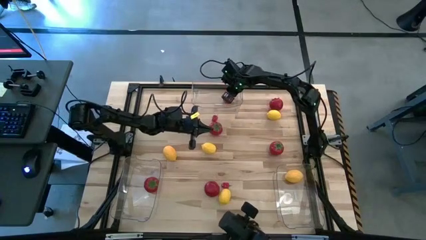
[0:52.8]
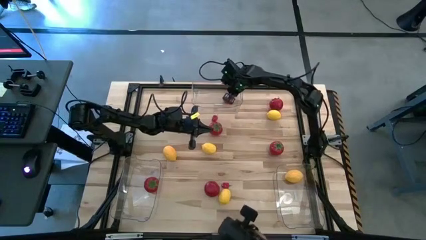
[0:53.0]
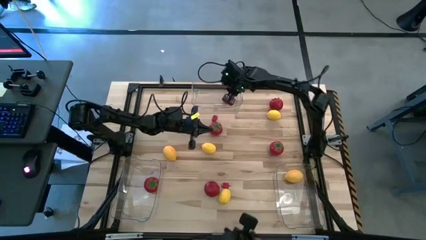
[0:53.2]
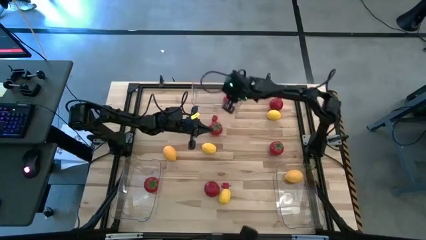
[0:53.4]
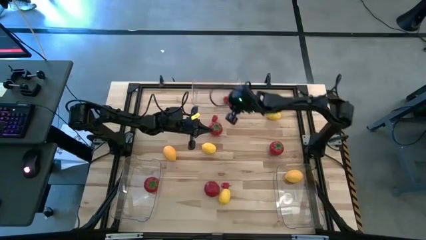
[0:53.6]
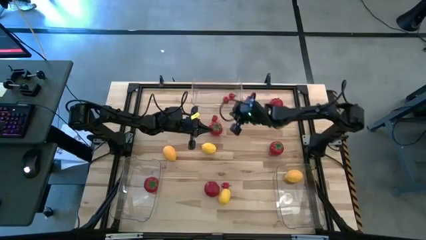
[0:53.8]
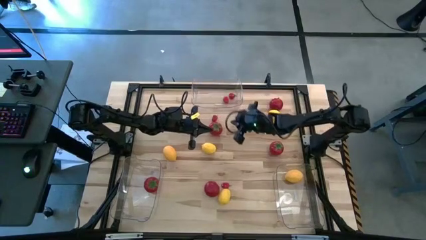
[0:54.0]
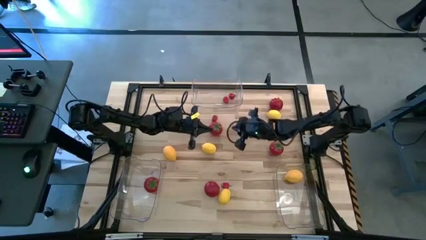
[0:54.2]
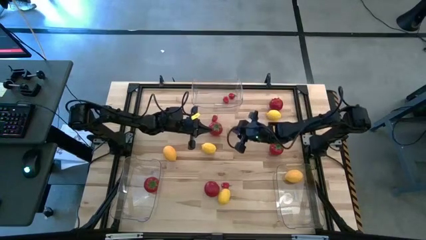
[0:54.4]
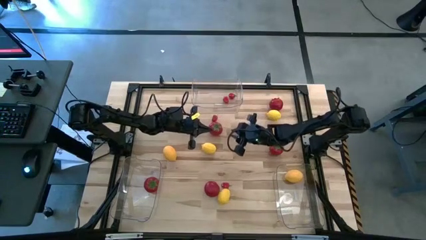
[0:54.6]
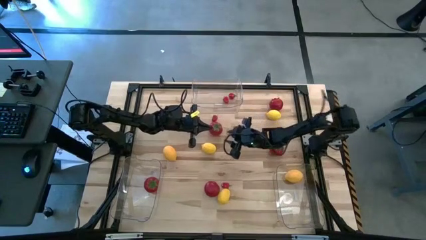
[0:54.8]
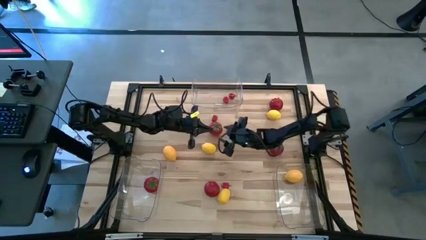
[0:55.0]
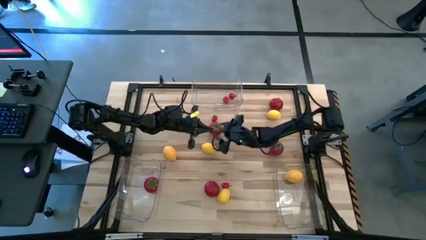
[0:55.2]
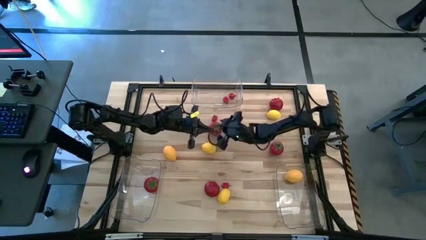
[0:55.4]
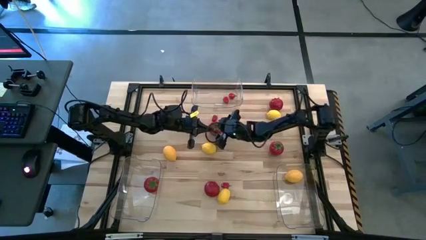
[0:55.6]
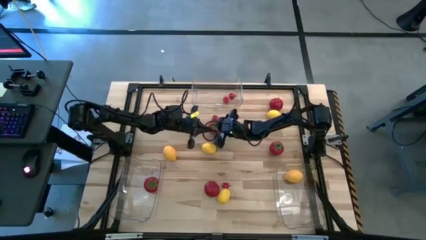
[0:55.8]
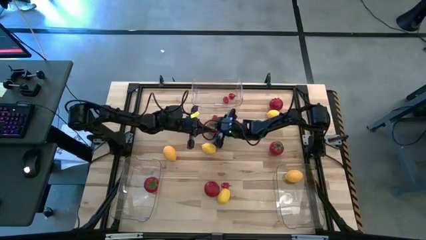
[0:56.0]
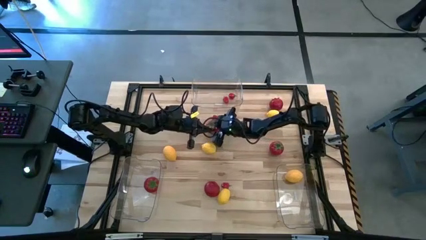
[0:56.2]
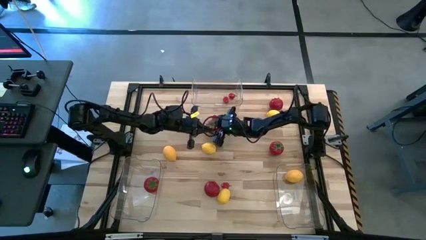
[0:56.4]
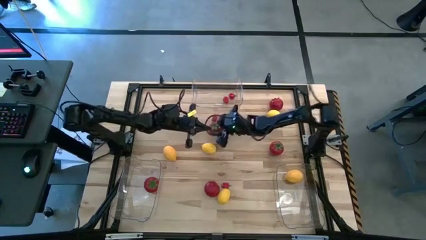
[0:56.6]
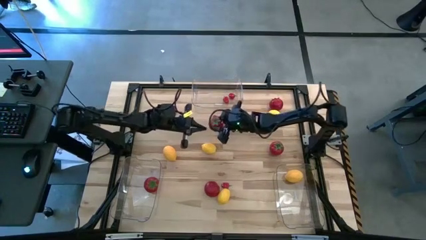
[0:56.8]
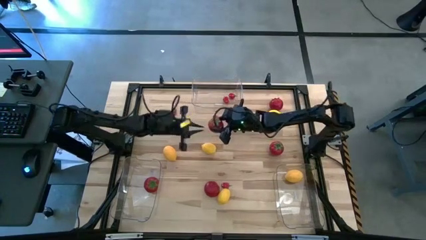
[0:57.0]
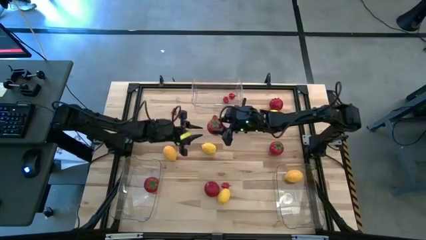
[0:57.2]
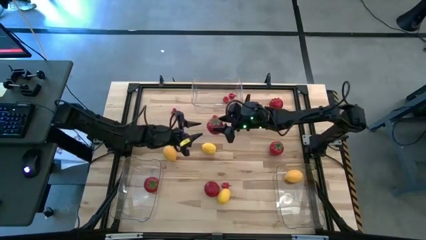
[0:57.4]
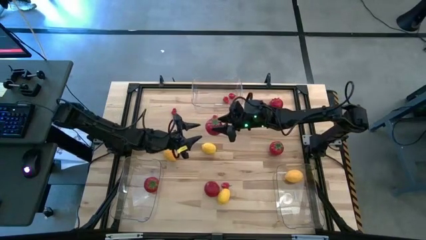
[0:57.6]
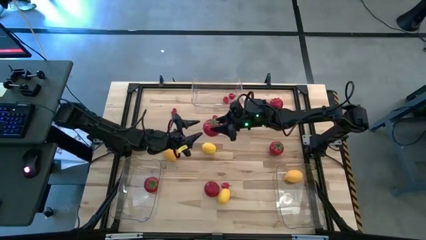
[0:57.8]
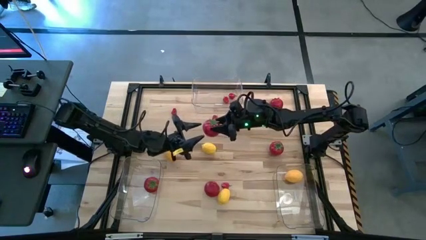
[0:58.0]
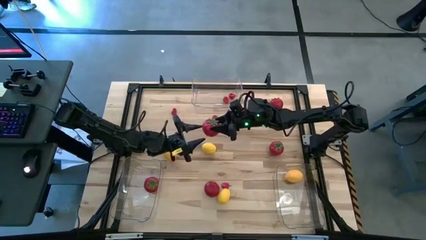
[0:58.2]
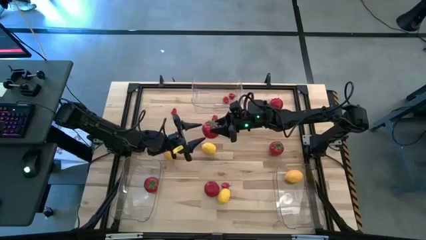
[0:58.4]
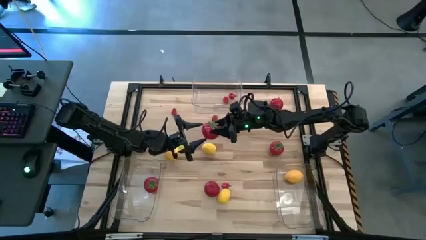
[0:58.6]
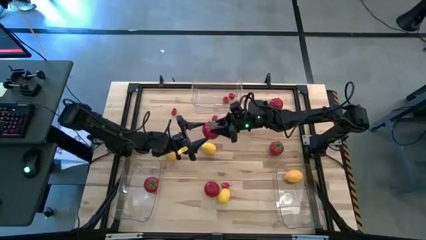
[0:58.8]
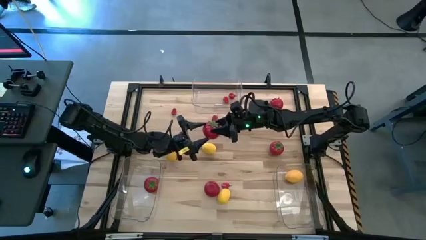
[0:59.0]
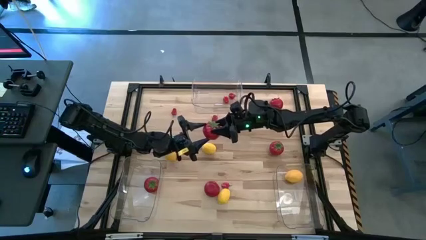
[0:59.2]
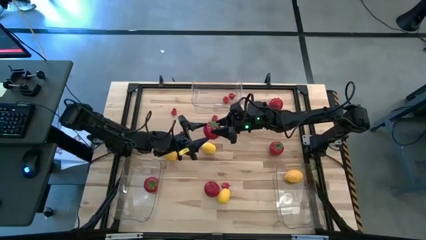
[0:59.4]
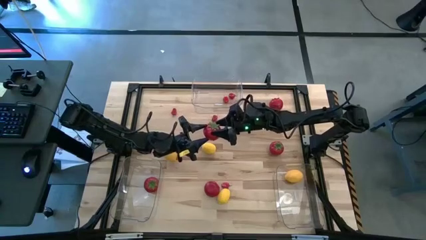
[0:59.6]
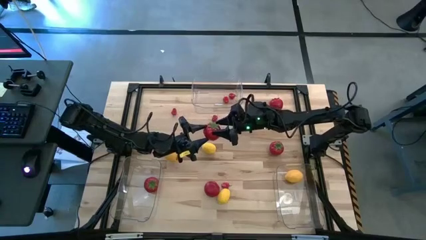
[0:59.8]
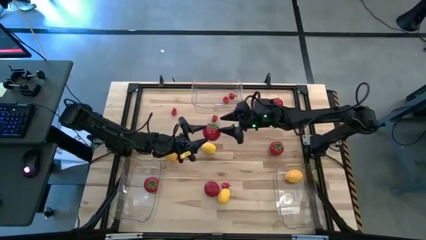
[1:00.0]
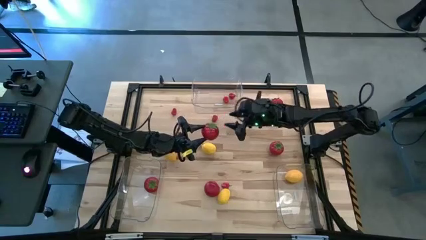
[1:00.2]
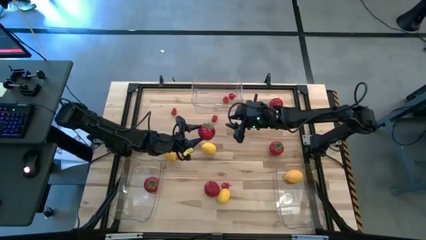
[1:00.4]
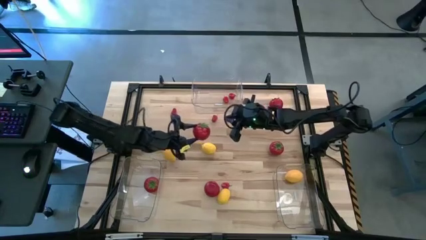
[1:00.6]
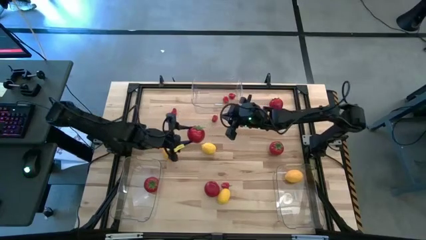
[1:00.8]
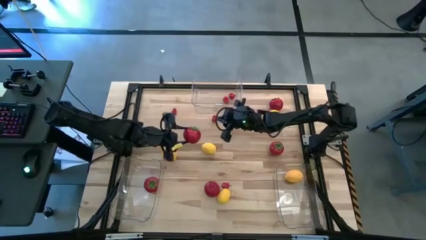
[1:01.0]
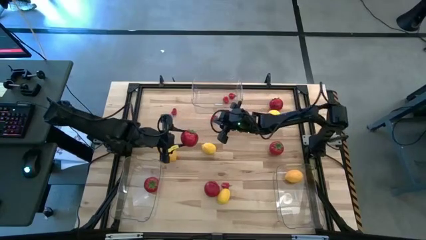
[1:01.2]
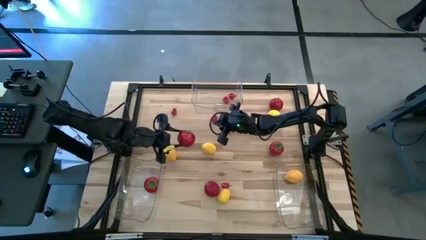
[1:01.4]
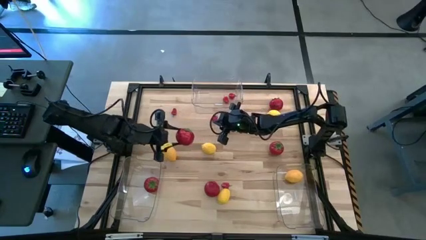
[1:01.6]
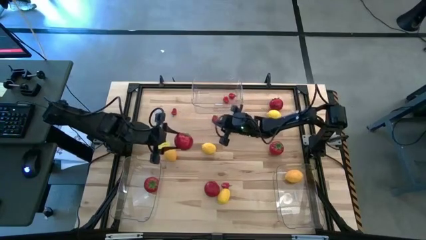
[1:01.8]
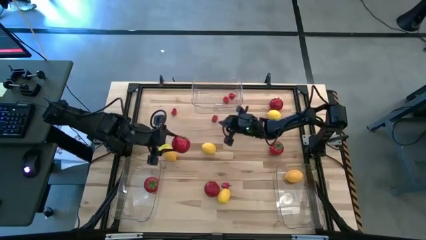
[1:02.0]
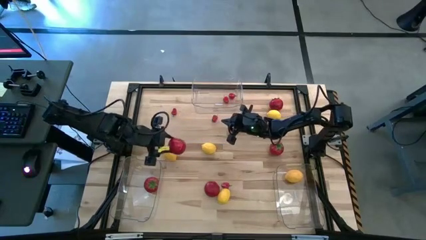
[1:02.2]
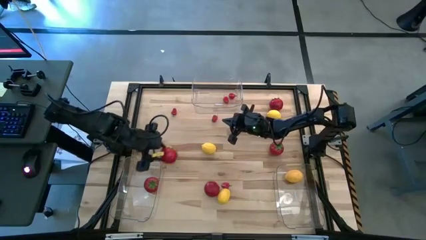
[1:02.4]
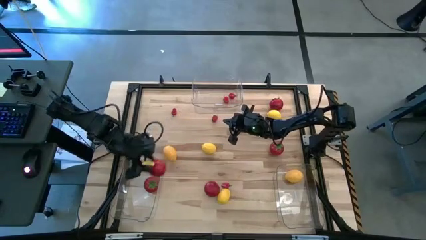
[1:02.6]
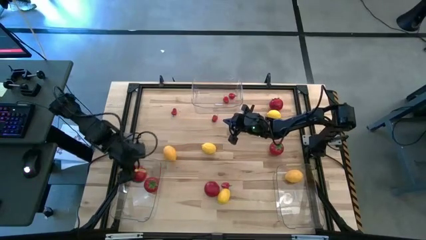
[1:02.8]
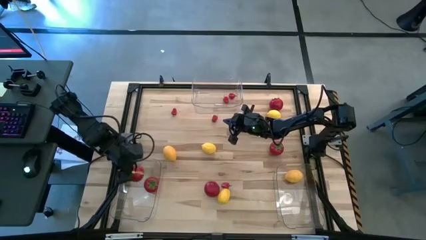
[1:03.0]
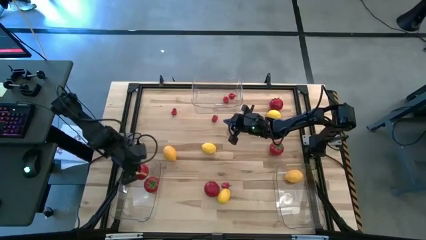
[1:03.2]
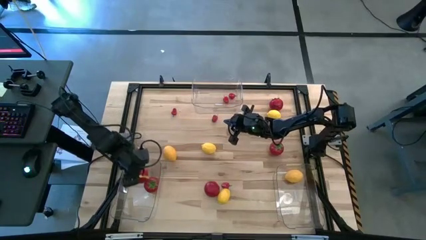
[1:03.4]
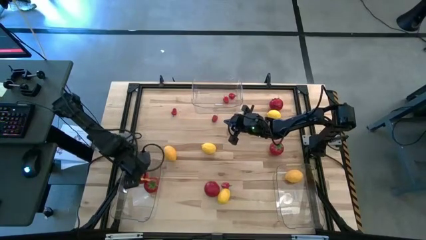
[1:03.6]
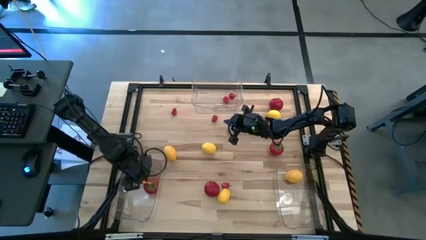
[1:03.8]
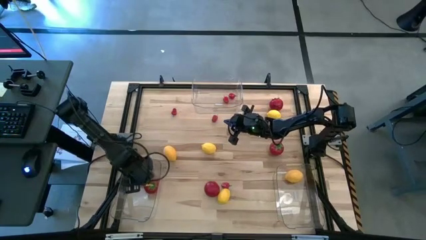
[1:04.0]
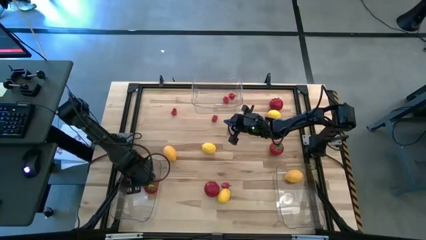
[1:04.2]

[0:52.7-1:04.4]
Task: Sort produce into baskets
Put the red tomato into the bottom left transparent bin

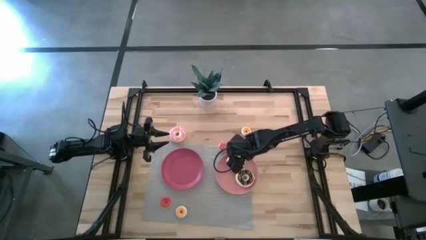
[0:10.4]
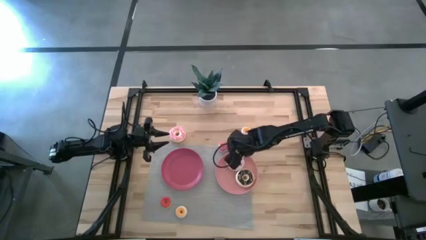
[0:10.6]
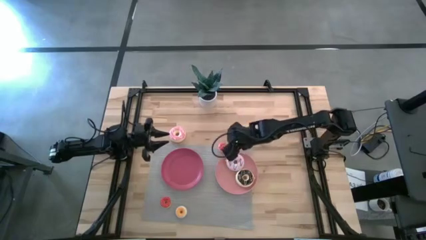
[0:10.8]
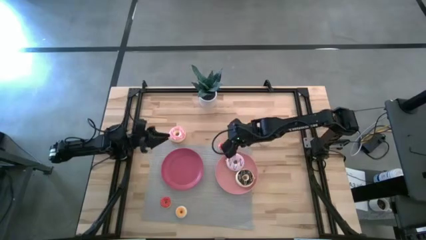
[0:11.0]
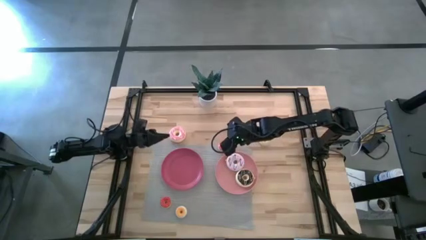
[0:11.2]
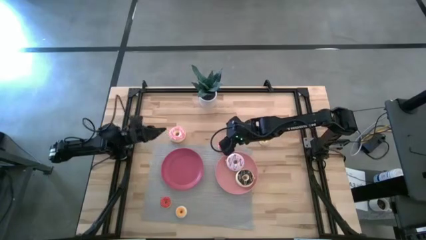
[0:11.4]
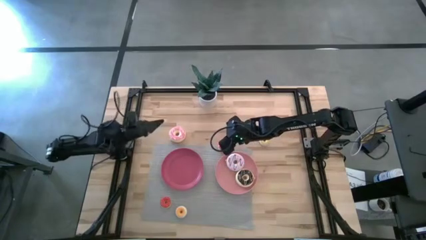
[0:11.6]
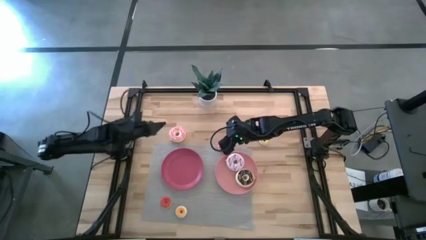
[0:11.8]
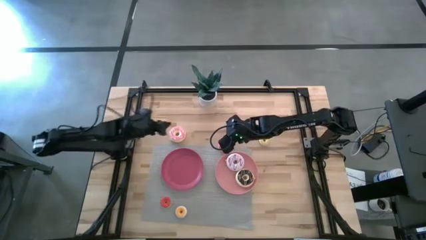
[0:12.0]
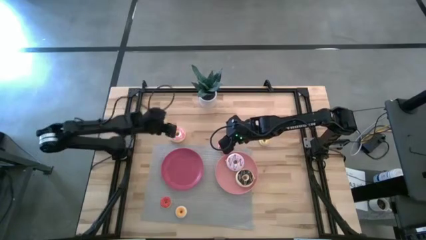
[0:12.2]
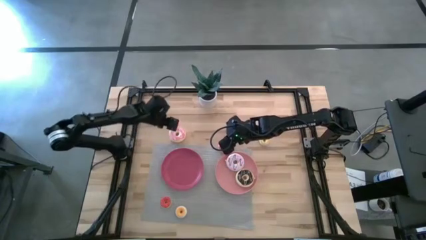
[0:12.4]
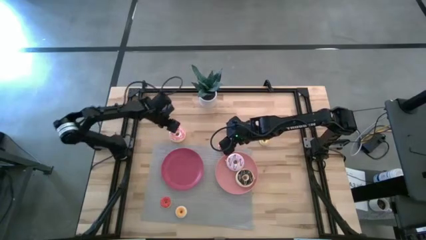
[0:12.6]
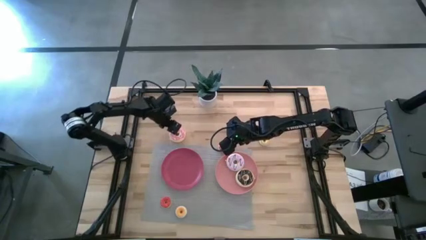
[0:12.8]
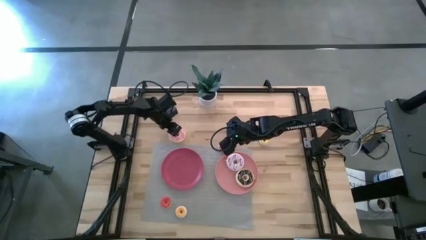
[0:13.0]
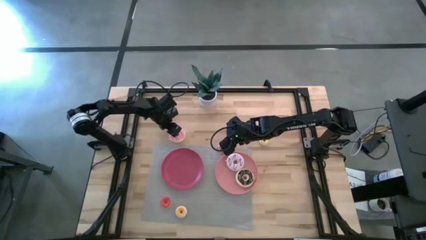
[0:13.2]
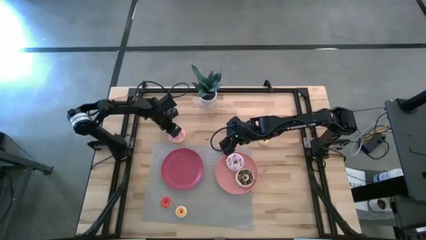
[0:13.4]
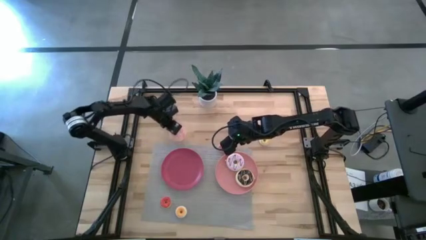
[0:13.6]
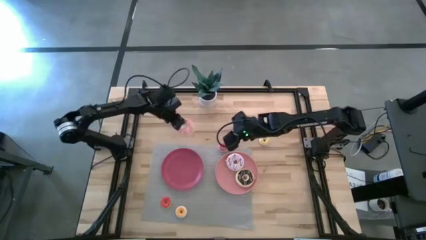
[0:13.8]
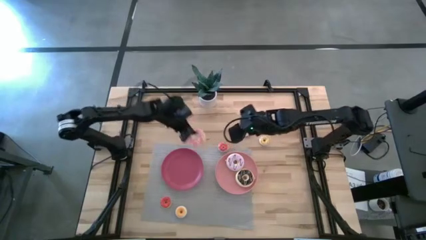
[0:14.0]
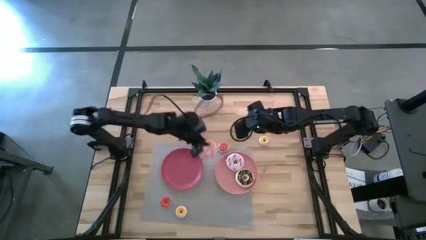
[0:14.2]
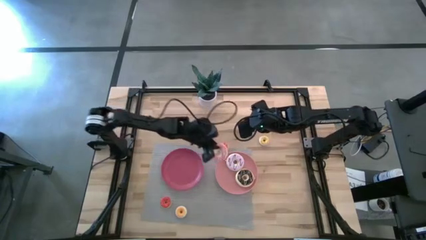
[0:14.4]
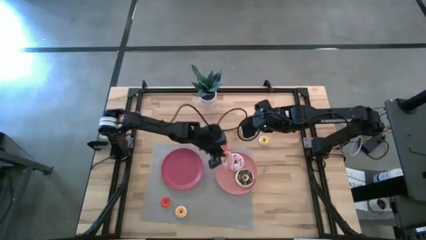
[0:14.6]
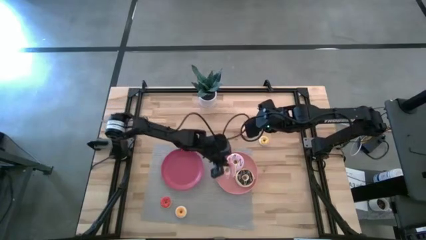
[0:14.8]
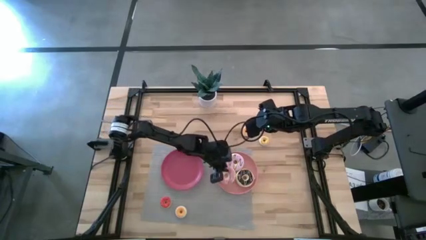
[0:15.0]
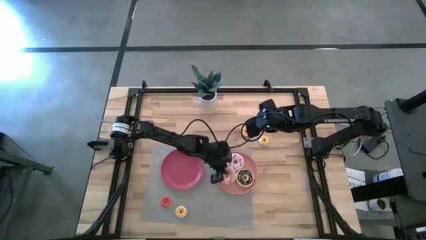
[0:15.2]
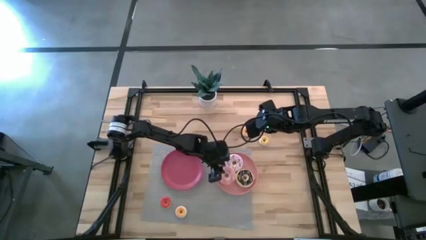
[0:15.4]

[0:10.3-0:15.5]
Task: Pick & Place donuts
Put the large pink donut on the light pink plate
